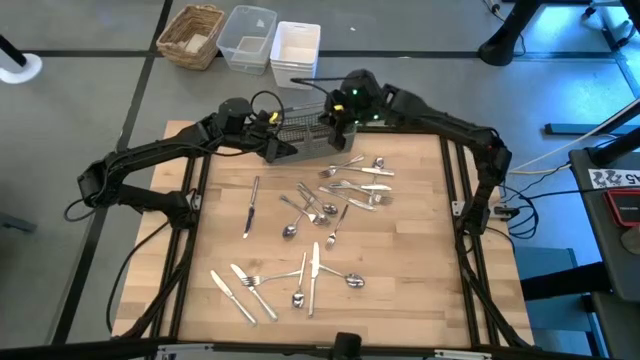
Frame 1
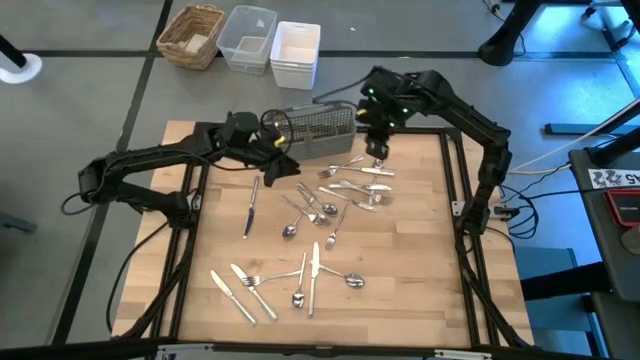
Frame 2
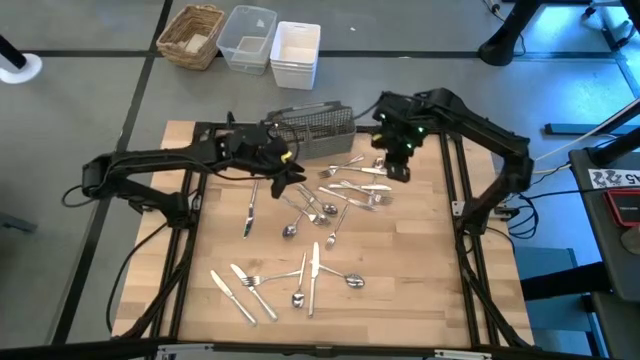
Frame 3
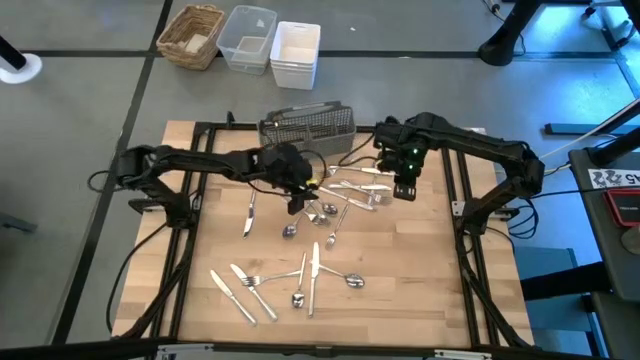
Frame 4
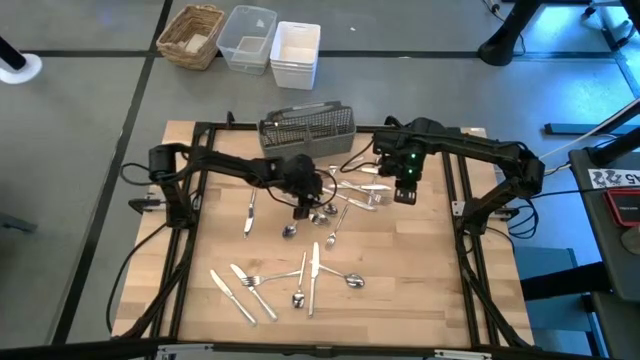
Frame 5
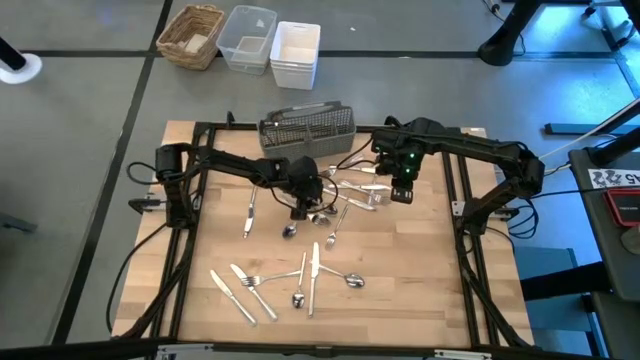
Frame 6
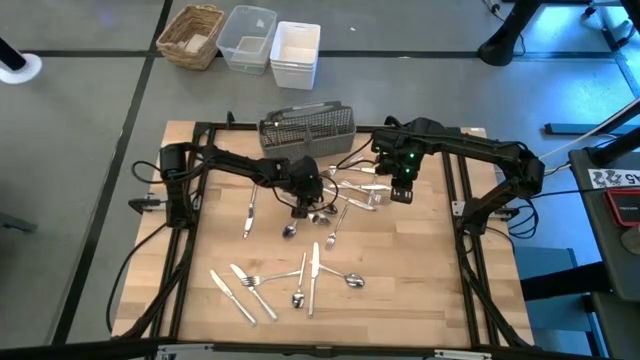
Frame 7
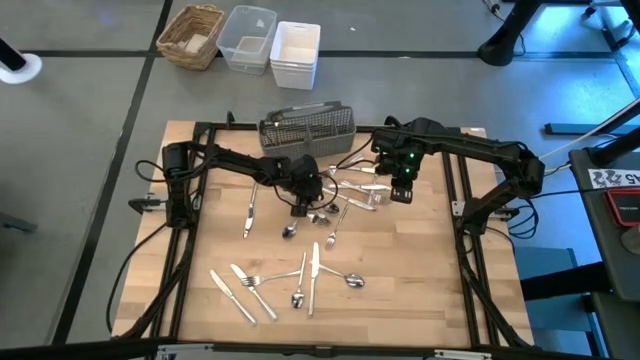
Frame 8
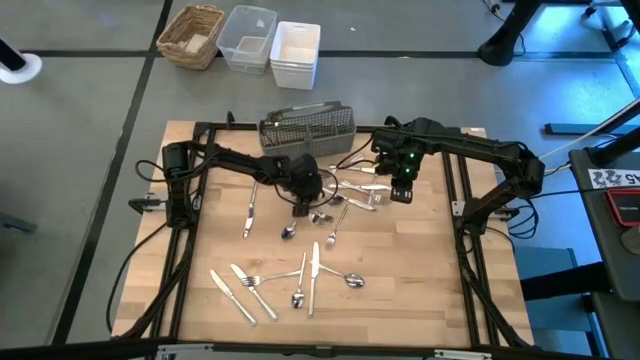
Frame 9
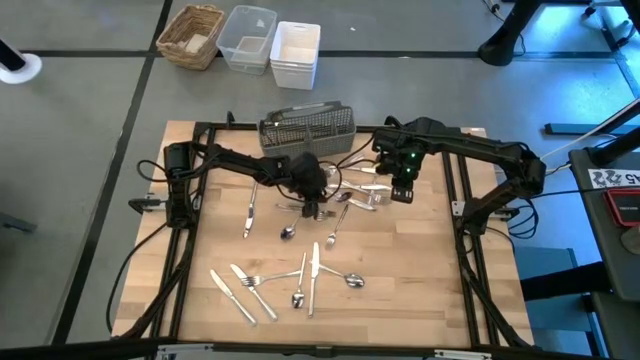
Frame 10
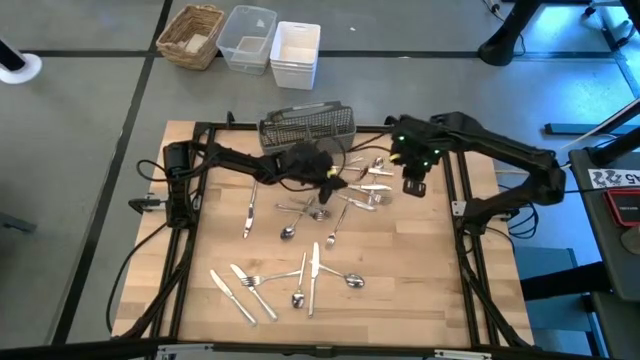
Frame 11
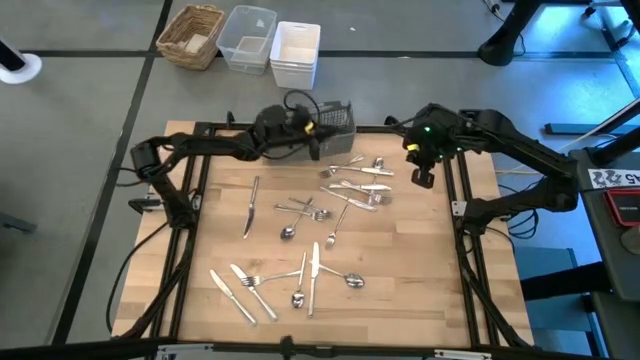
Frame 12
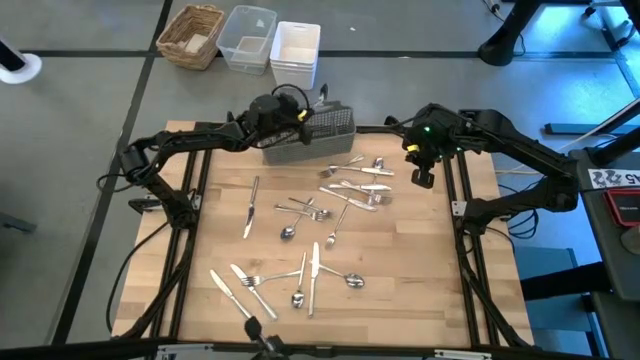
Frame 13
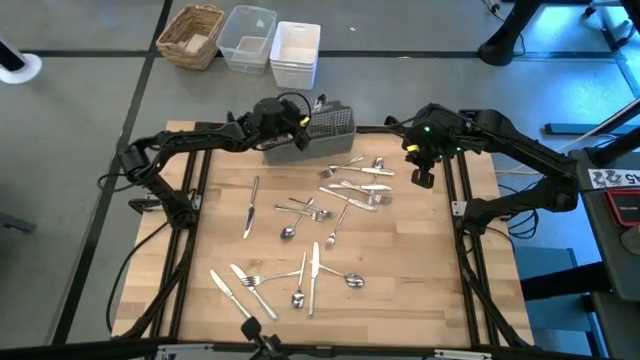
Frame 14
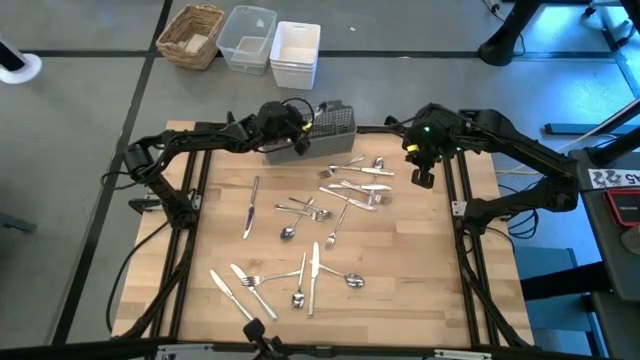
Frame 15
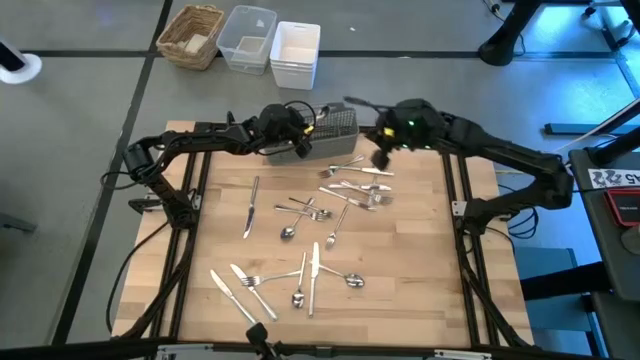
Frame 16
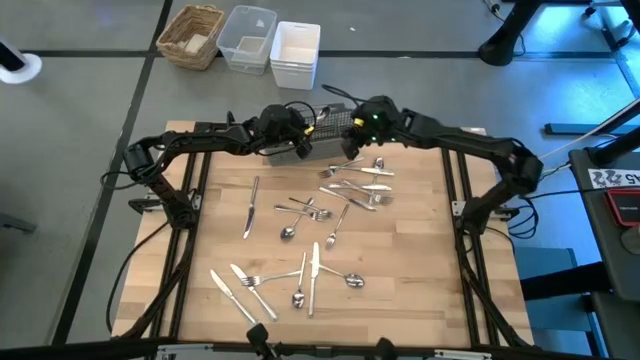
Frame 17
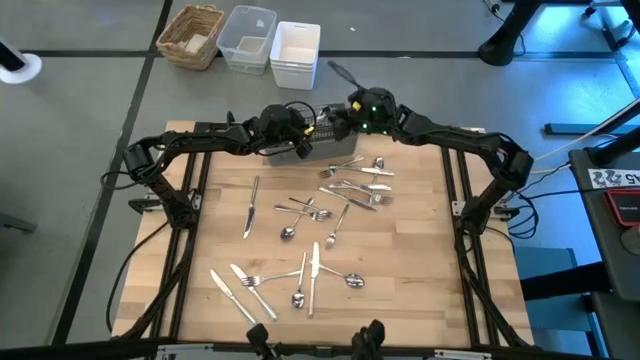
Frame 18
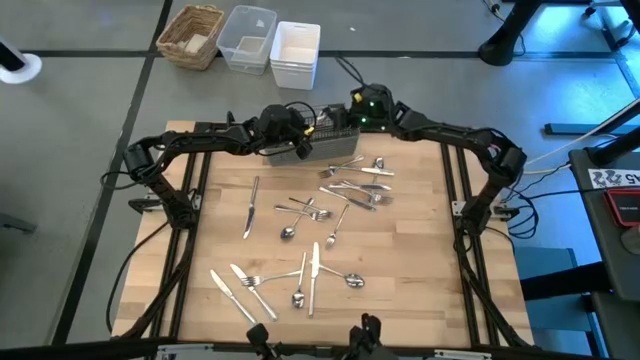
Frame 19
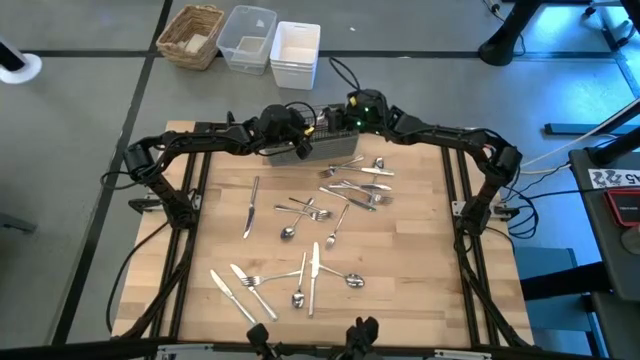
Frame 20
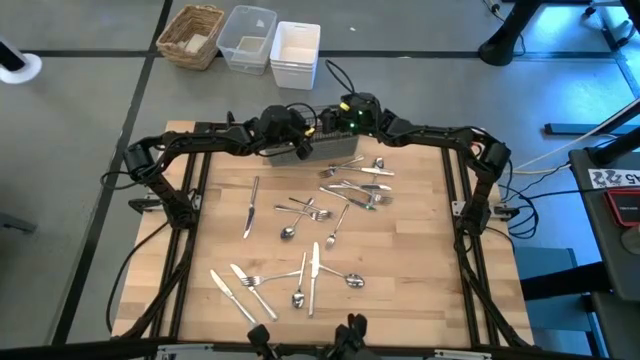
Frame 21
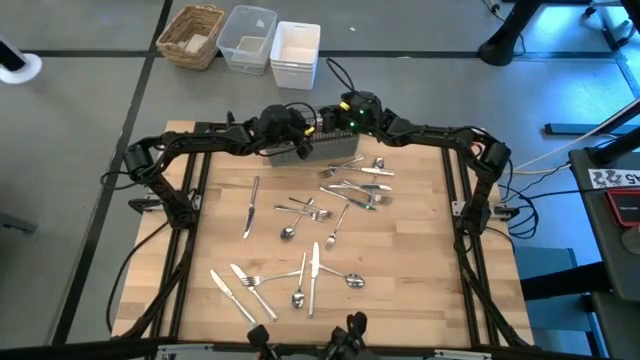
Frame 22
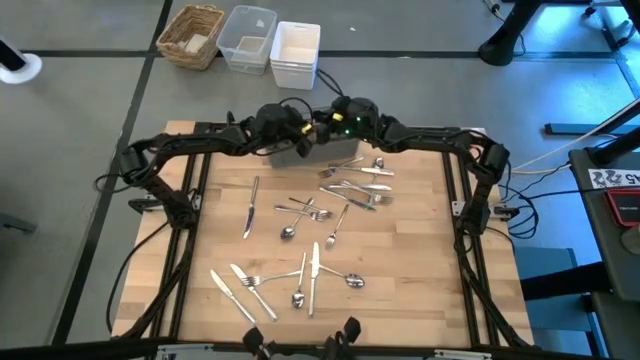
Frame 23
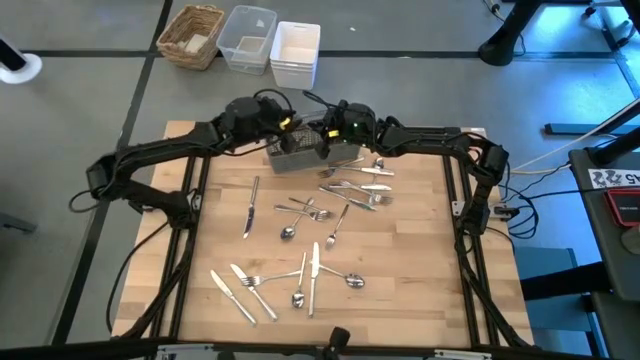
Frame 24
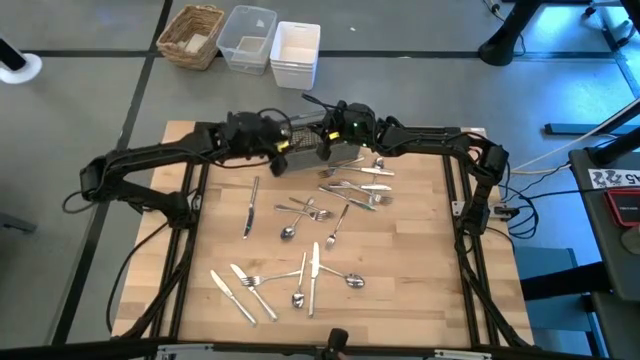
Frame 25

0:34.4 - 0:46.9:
Task: Sort silverware
Put the silver spoon into the silverware rack

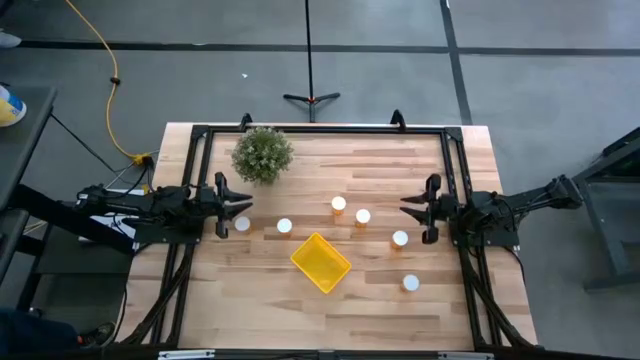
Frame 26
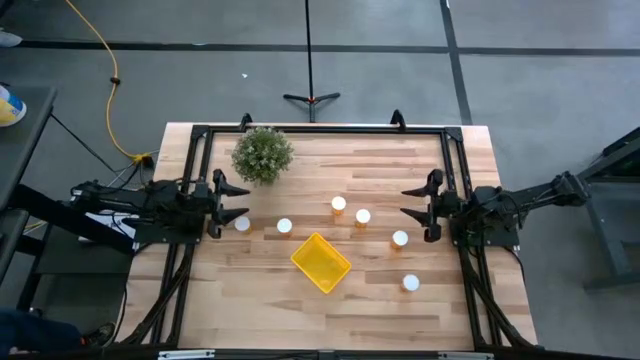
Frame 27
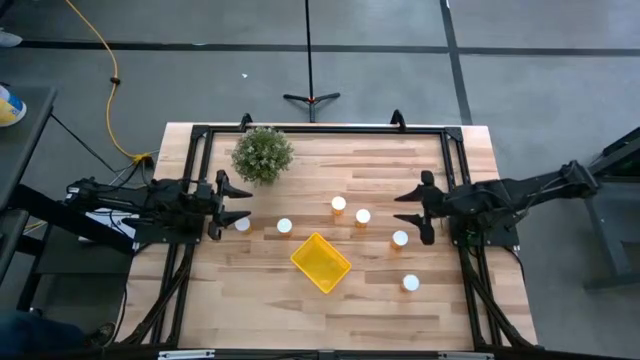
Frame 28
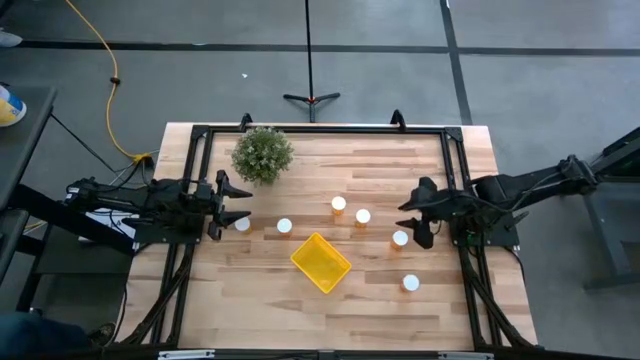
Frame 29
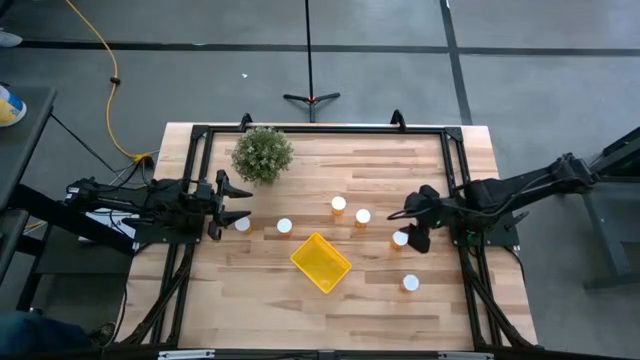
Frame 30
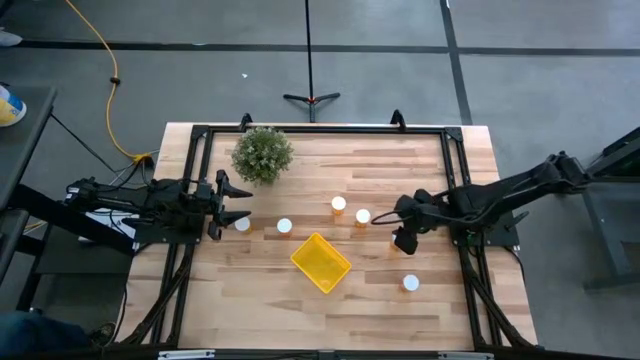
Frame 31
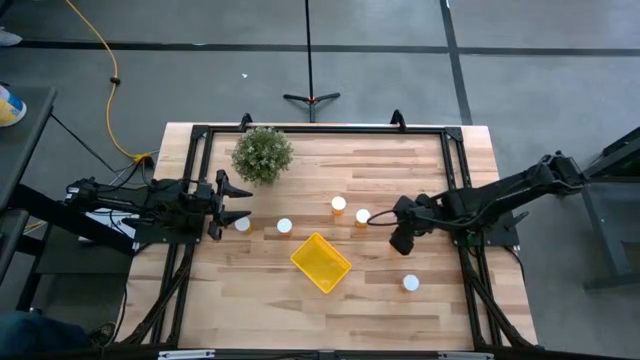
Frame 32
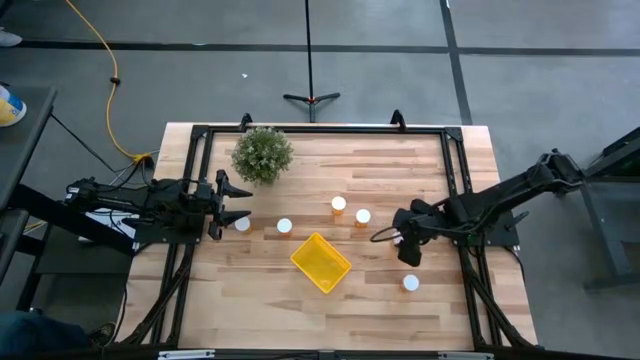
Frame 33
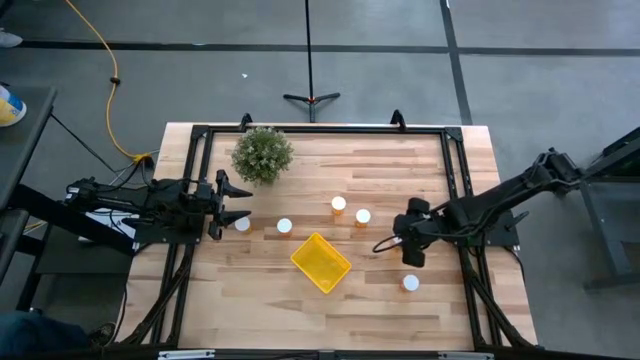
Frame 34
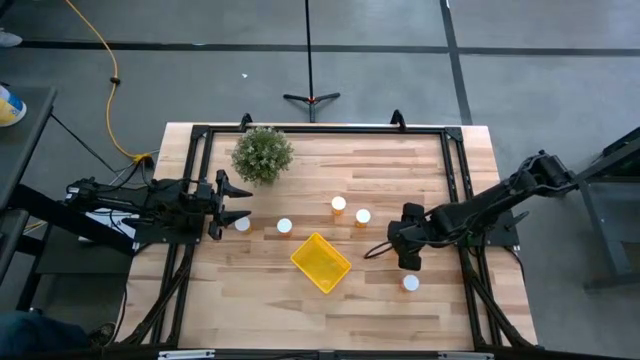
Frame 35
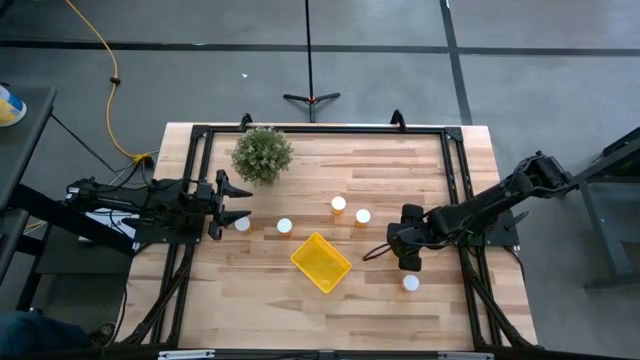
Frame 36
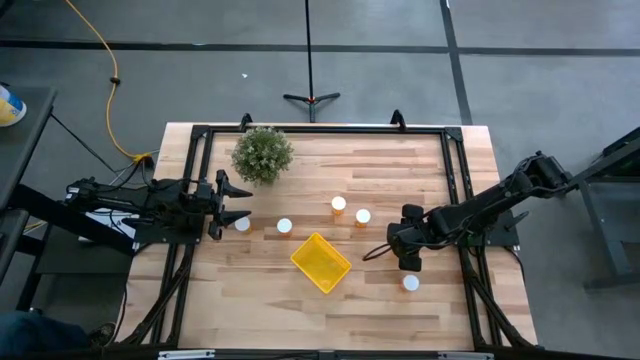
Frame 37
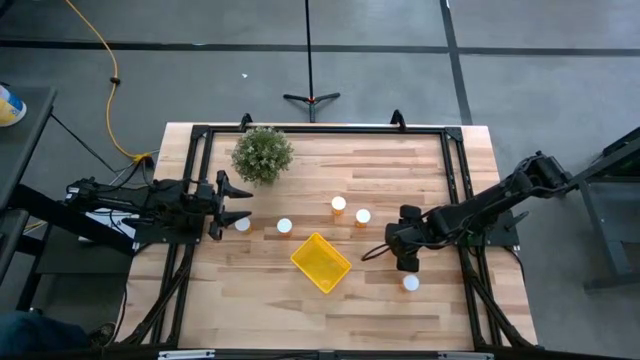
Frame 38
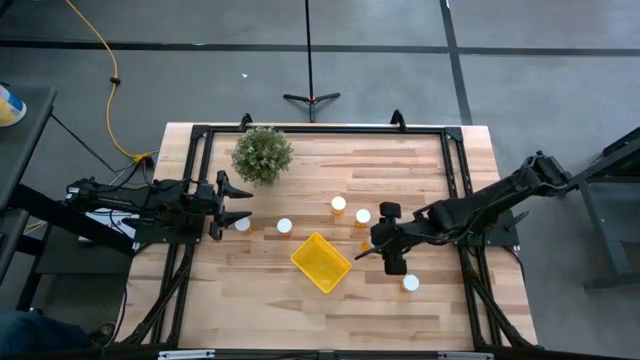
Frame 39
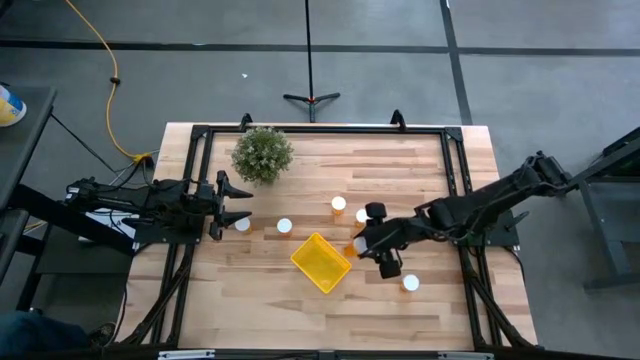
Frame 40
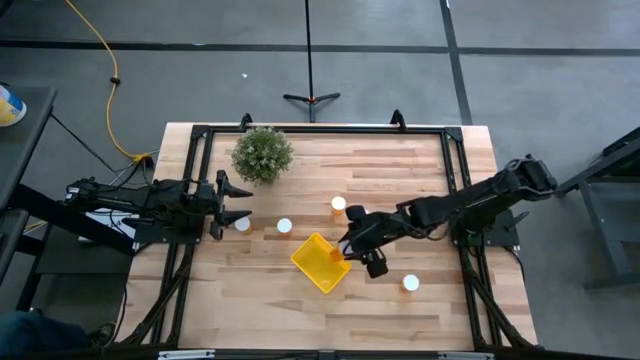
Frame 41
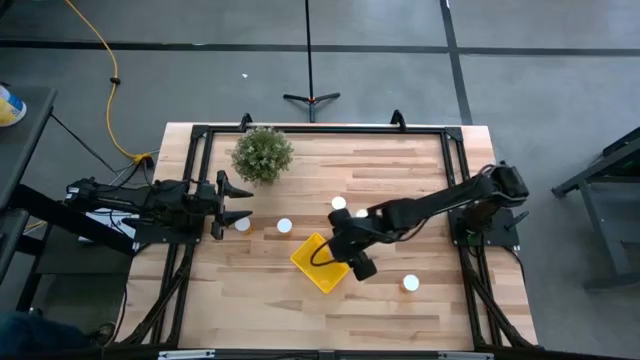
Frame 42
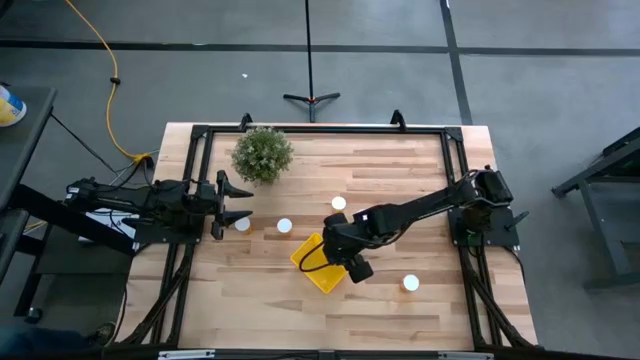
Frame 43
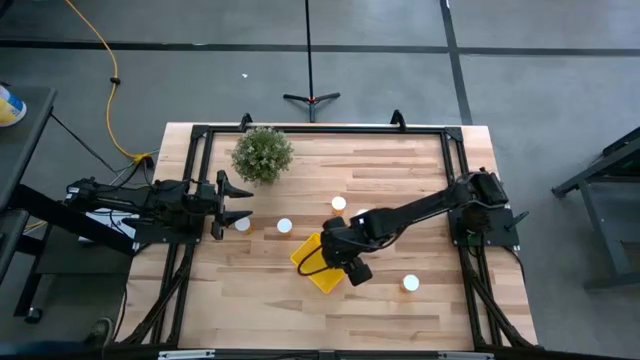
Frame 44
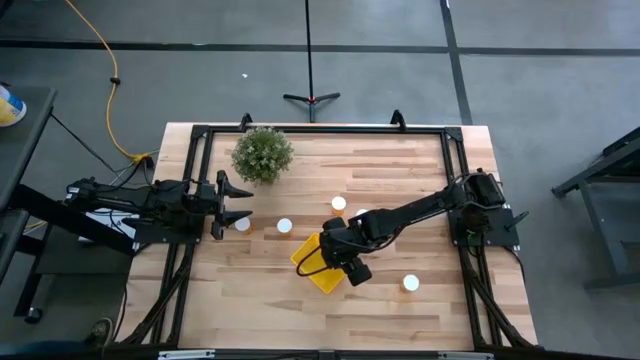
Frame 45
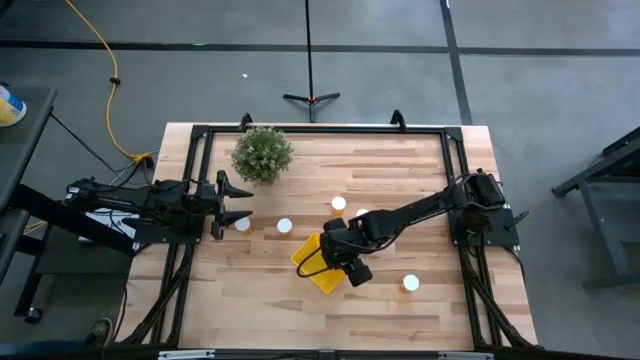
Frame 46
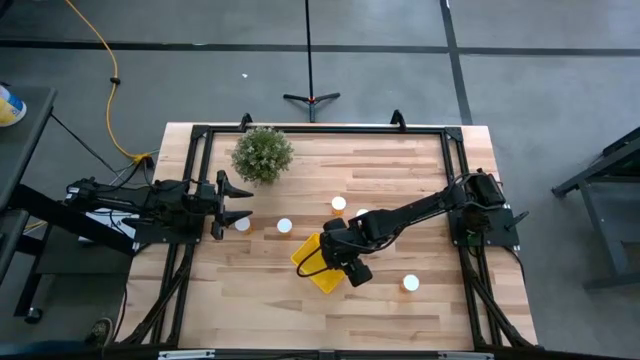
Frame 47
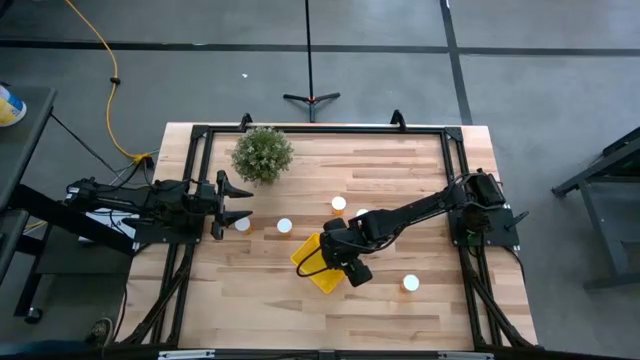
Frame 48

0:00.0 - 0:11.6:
Task: Pick and place pill bottles into a basket
Put the pill bottle into the yellow transparent bin
